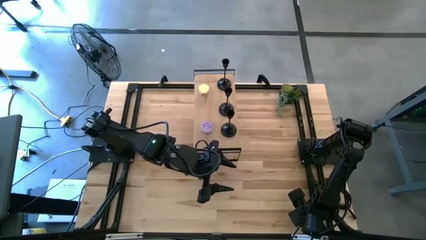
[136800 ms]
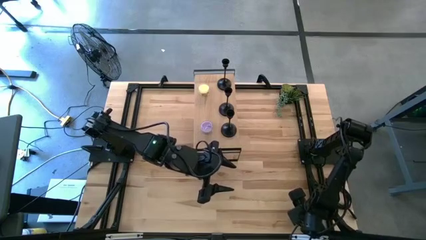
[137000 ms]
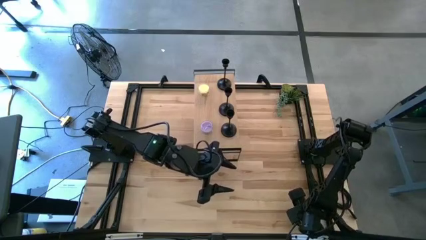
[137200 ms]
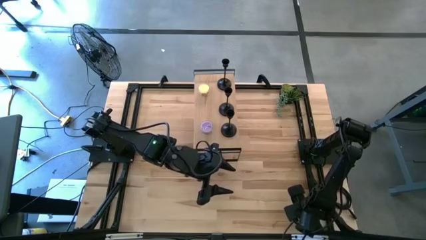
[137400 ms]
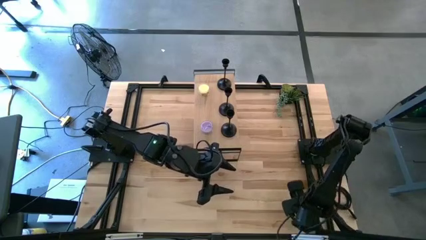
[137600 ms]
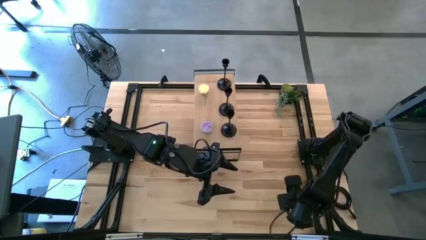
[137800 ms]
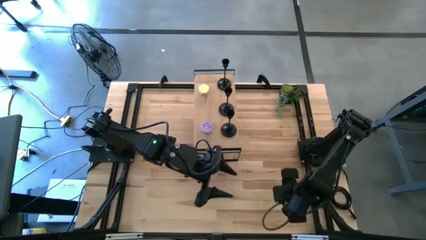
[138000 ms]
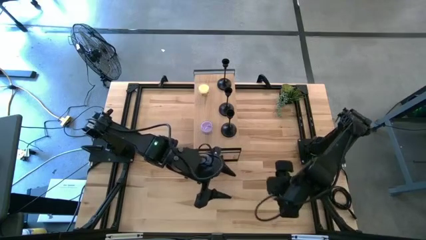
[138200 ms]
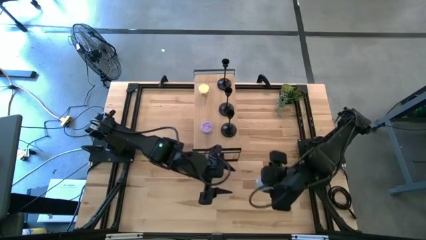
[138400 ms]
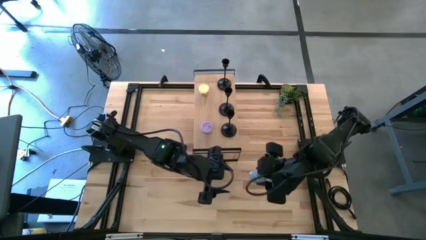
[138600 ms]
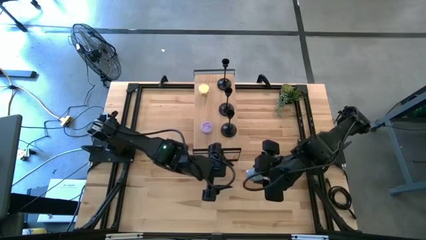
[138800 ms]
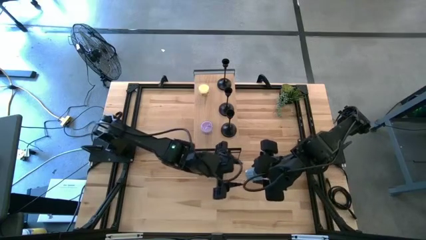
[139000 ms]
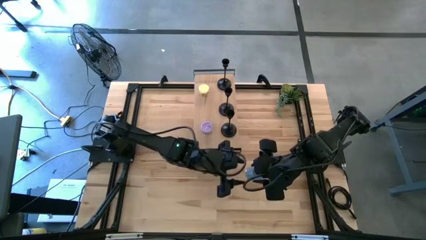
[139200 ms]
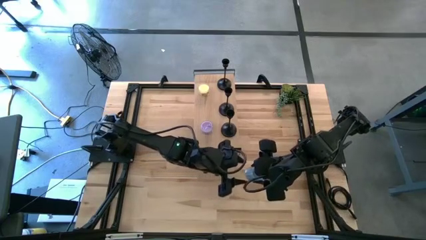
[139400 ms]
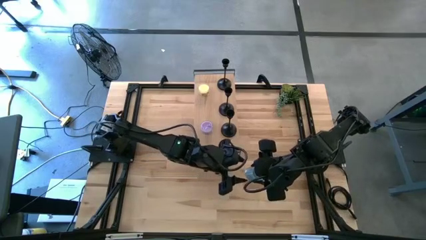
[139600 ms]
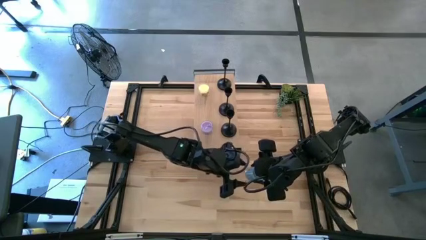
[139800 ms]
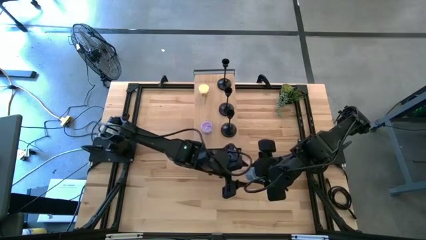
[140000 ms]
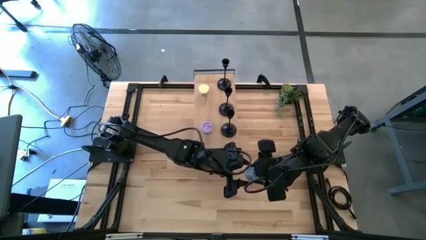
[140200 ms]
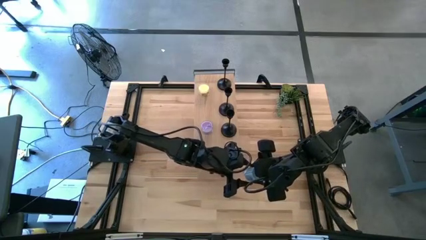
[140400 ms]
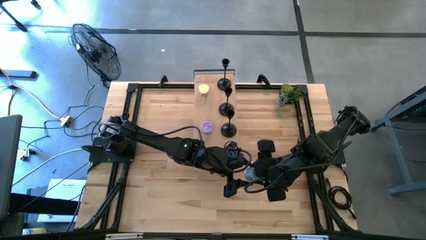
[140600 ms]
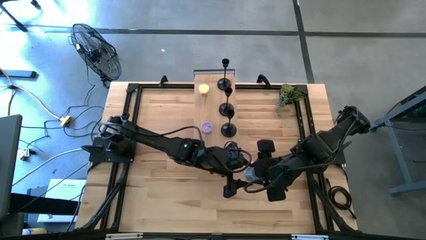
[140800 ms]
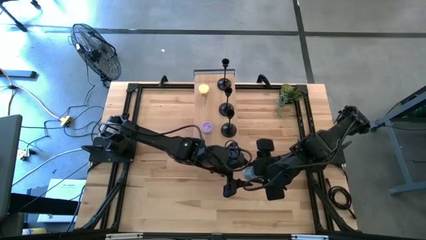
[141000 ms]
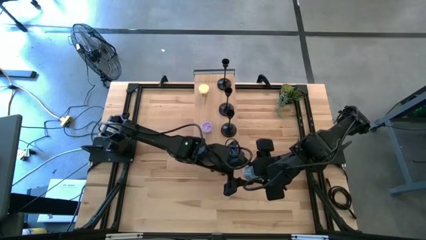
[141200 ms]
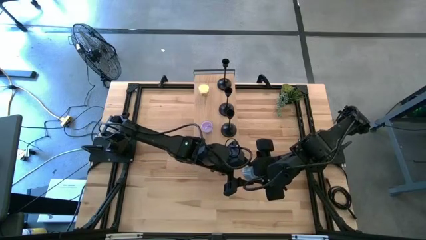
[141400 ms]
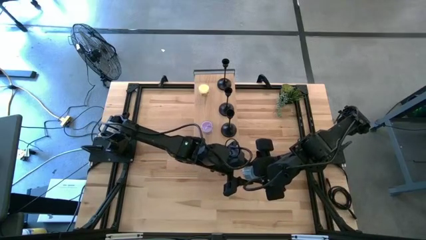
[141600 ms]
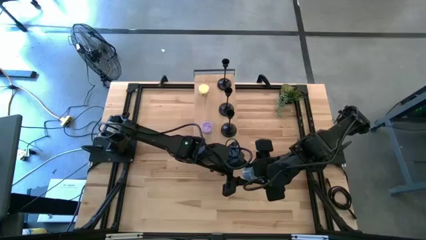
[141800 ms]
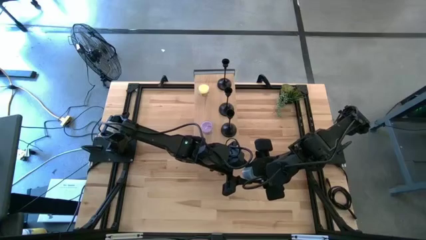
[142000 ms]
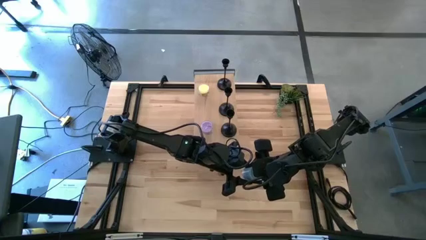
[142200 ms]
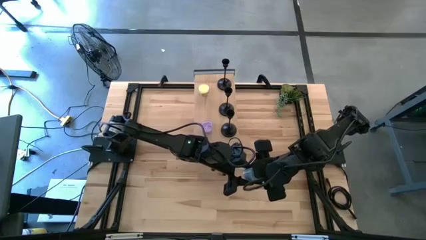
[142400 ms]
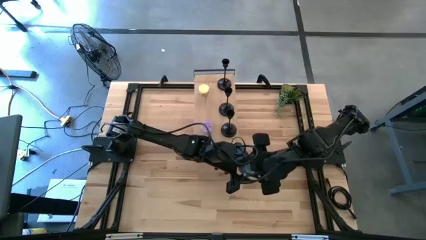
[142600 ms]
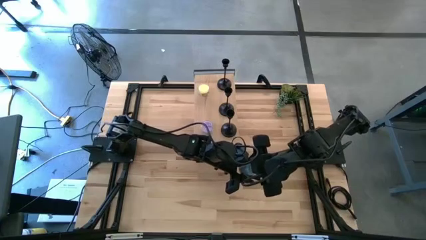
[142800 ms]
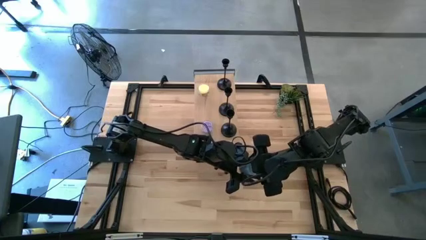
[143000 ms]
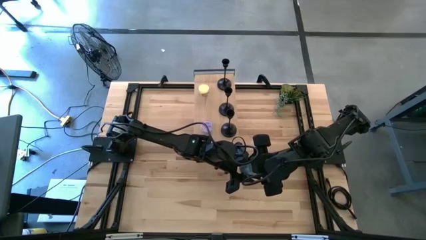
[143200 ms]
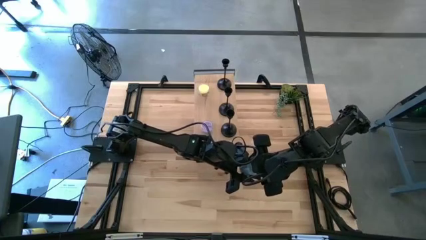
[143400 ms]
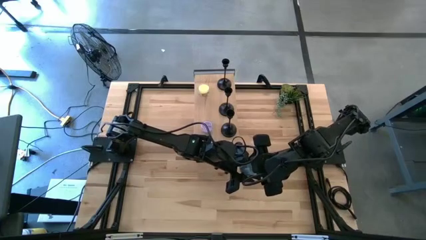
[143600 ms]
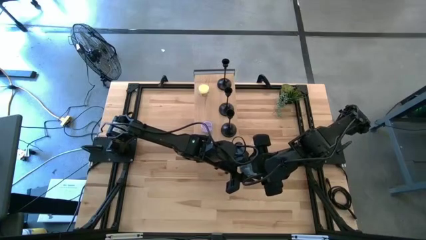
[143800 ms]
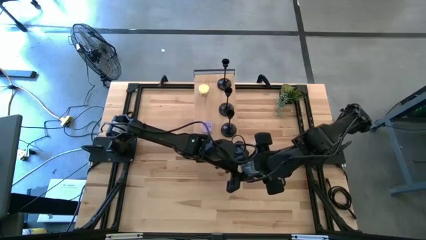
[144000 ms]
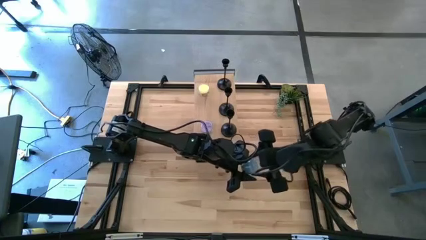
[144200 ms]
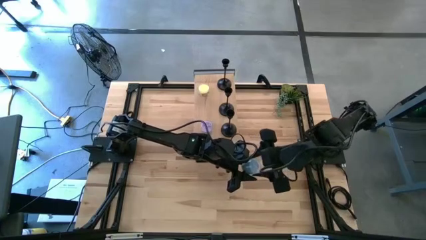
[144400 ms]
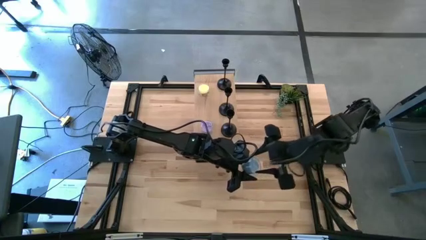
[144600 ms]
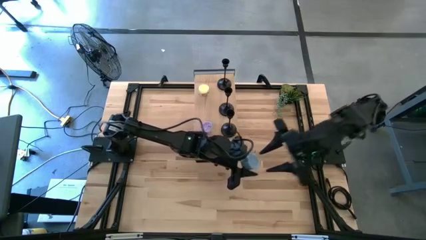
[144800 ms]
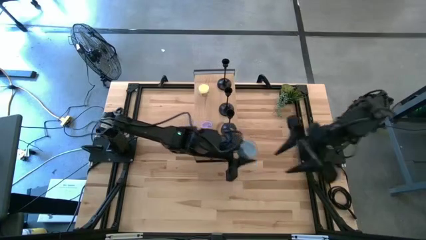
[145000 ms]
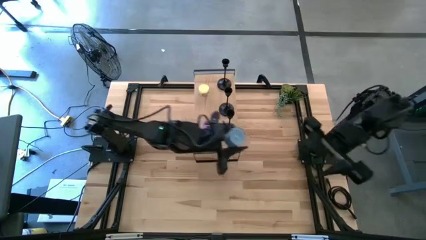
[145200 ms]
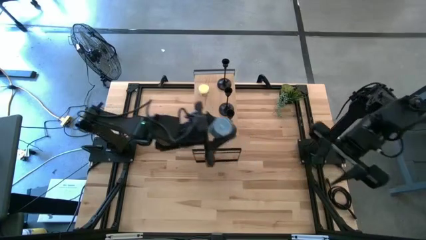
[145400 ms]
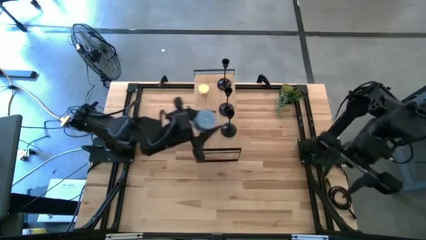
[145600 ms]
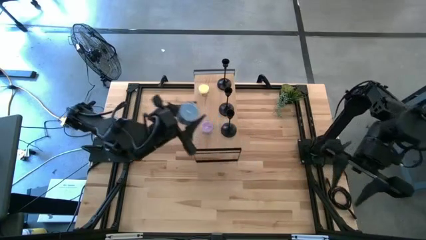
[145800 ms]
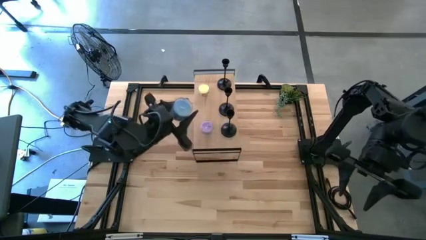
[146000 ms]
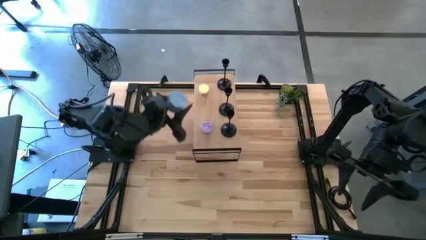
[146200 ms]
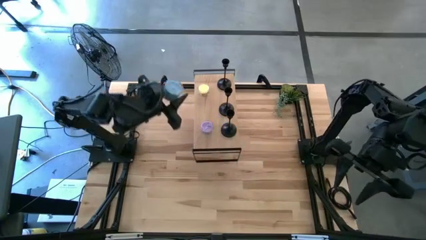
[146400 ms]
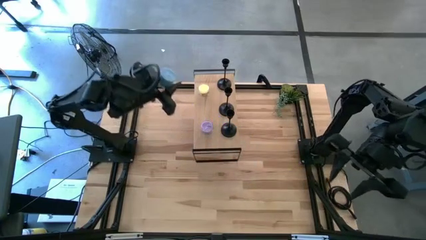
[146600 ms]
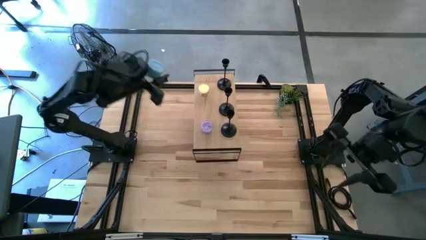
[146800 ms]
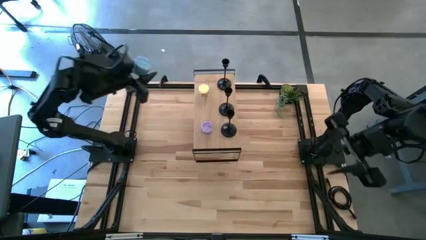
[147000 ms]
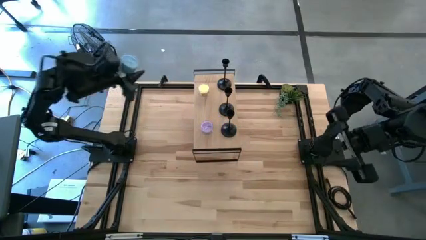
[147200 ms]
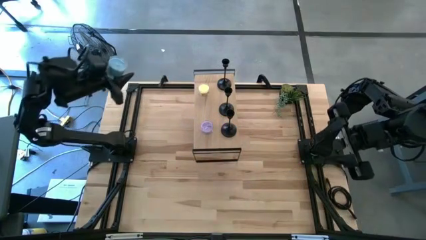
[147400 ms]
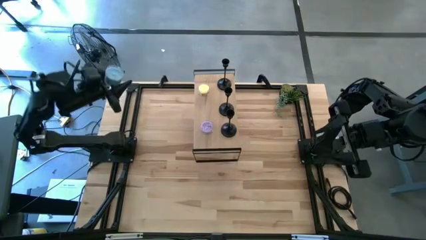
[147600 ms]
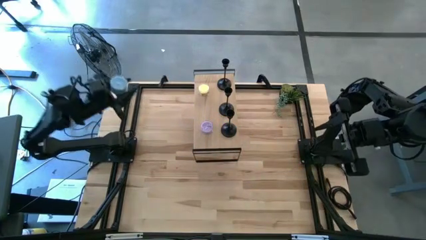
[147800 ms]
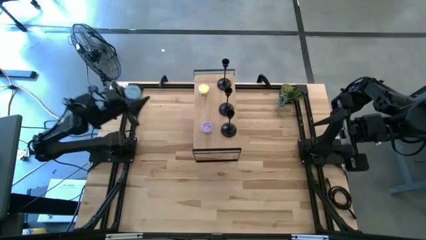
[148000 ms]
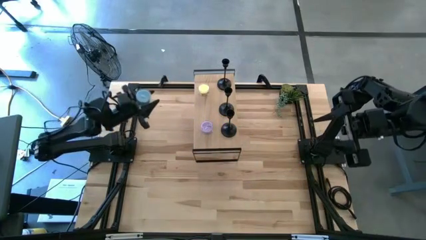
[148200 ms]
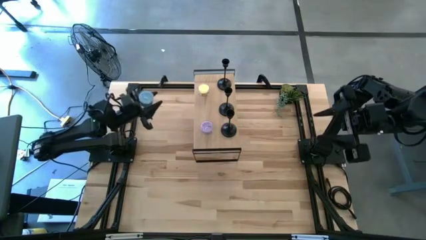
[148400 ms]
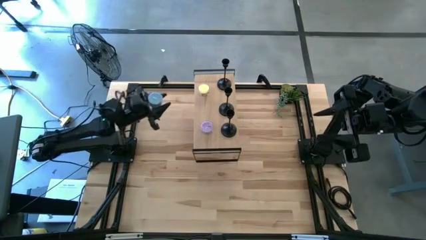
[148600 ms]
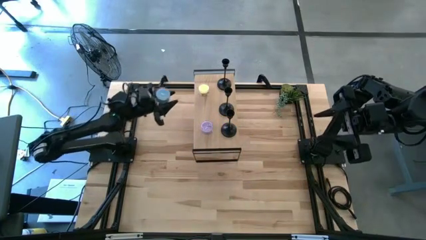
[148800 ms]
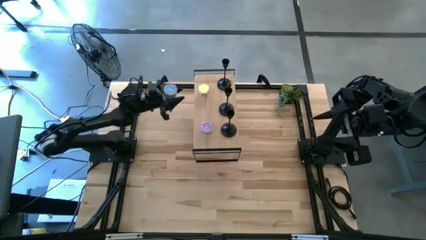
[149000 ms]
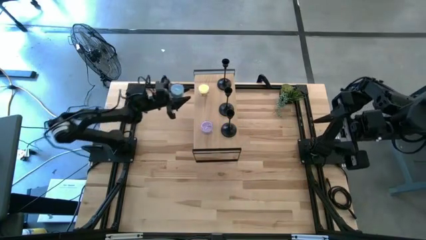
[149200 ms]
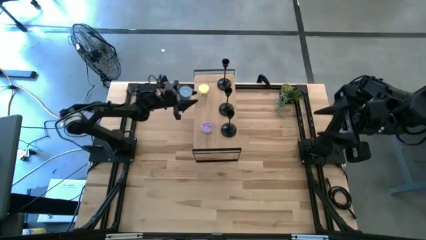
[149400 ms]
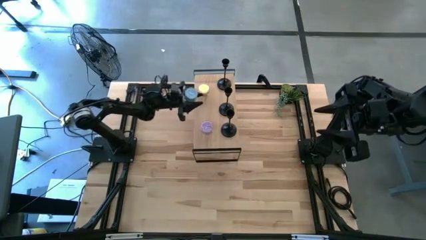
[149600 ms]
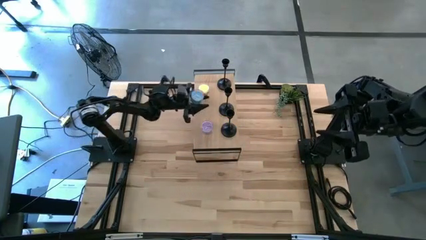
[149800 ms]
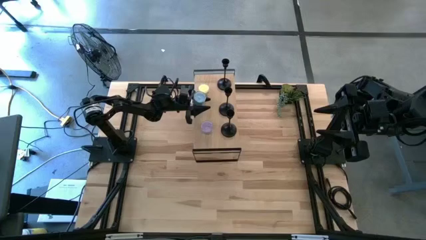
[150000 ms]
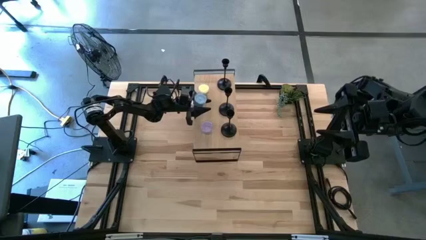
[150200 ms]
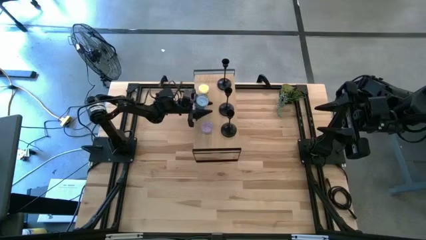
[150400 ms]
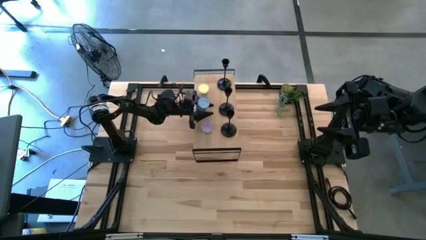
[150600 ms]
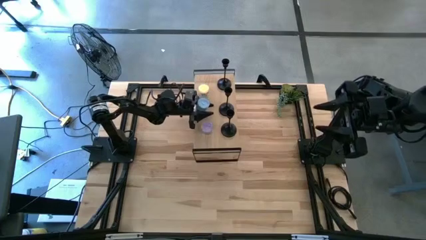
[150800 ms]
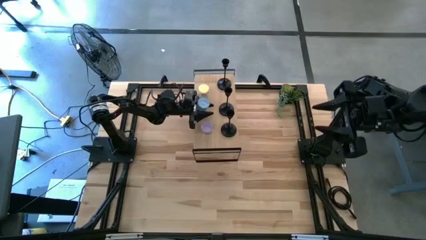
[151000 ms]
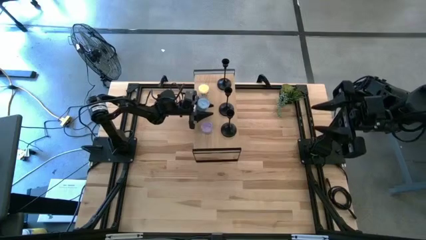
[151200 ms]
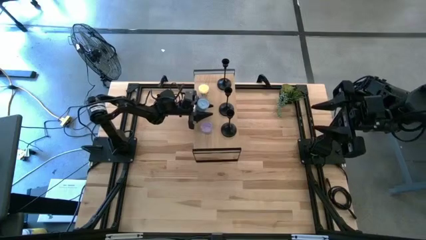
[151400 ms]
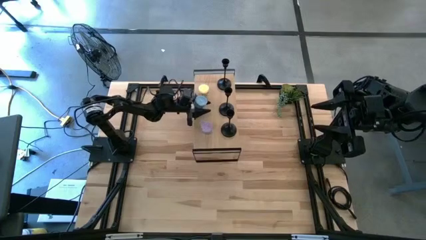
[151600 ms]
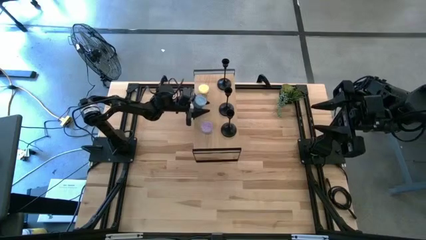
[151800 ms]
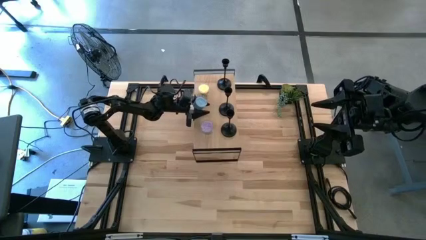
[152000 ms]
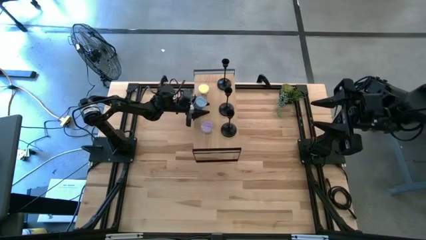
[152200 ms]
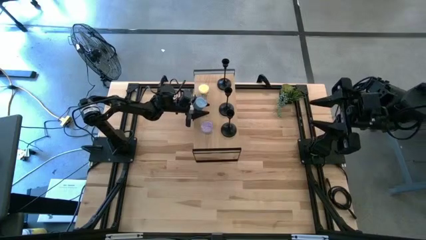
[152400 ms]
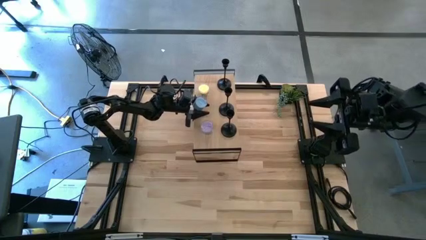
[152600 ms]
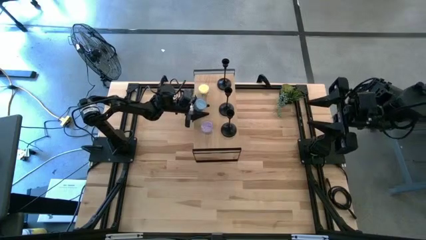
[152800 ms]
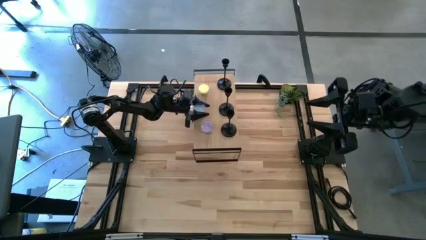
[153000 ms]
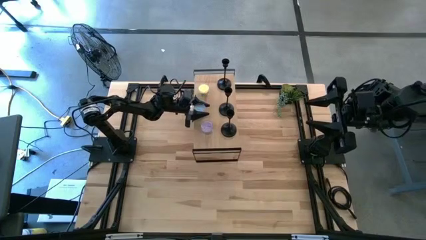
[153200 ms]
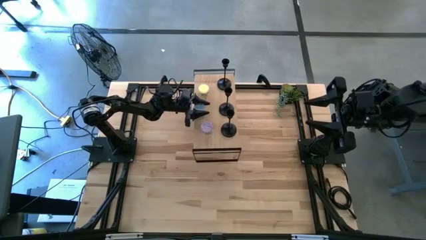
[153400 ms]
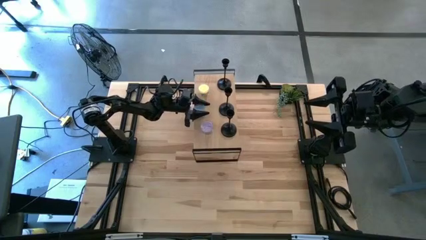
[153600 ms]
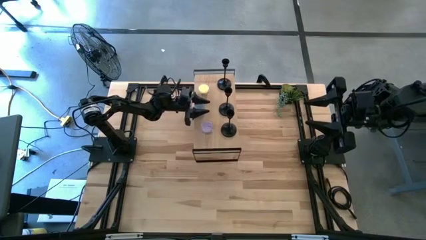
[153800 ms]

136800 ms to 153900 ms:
Task: Pick & Place candle stick holders
Put the blue scented candle on the shelf aligned with the scented candle on the shelf
